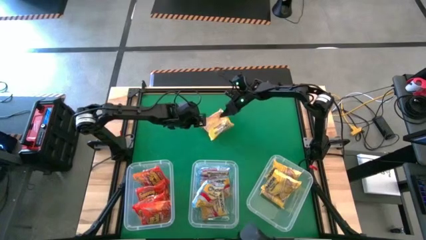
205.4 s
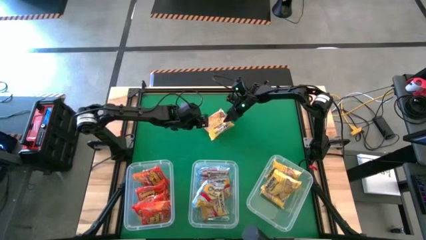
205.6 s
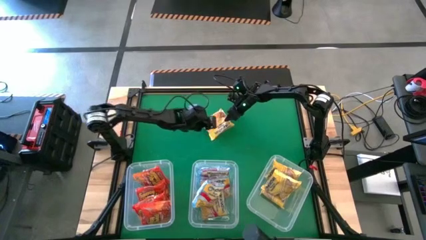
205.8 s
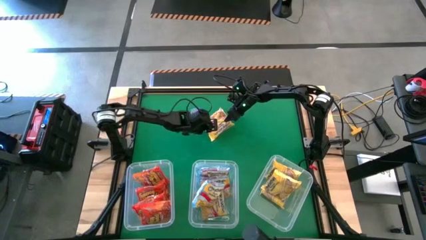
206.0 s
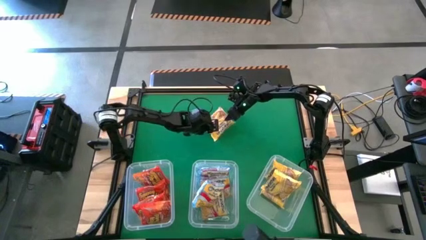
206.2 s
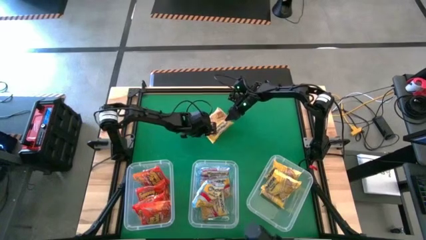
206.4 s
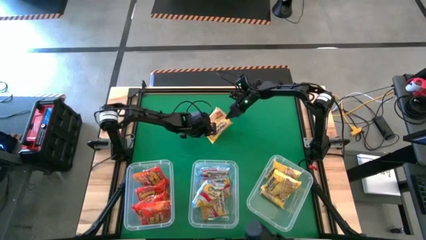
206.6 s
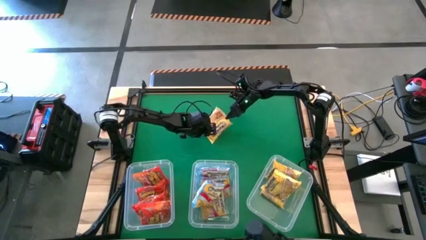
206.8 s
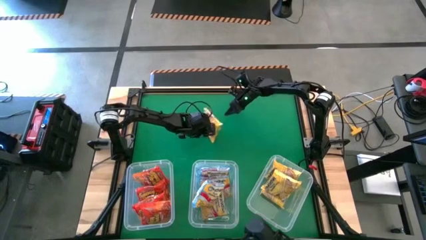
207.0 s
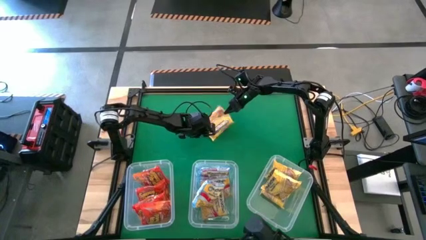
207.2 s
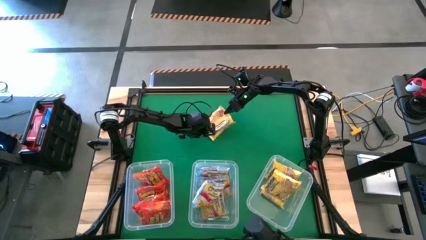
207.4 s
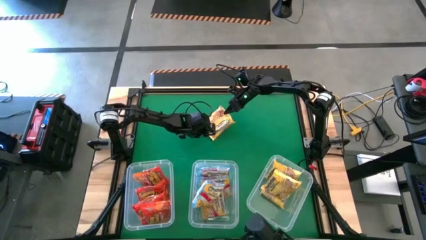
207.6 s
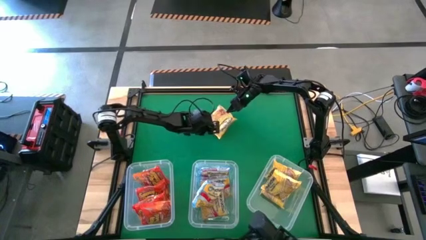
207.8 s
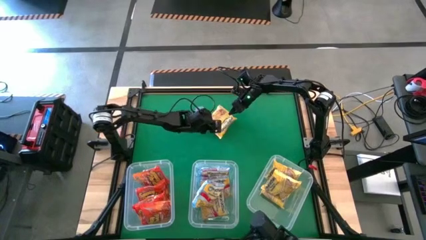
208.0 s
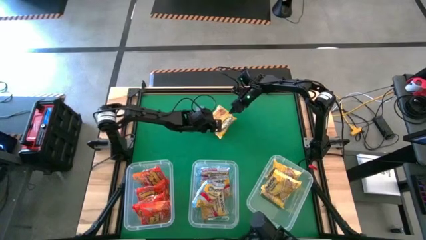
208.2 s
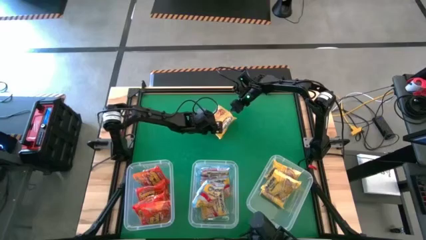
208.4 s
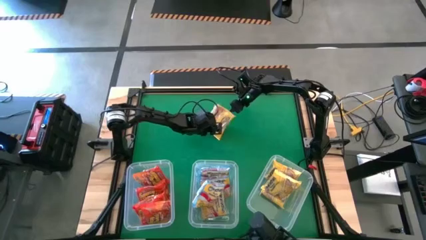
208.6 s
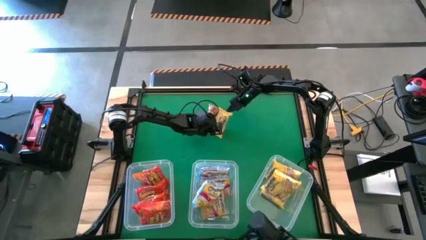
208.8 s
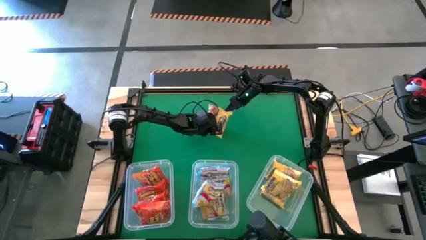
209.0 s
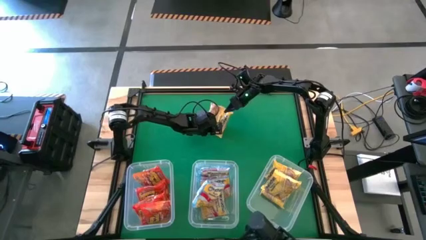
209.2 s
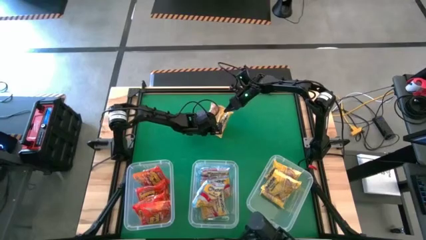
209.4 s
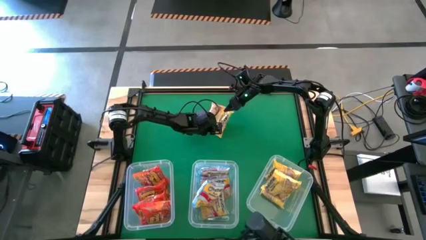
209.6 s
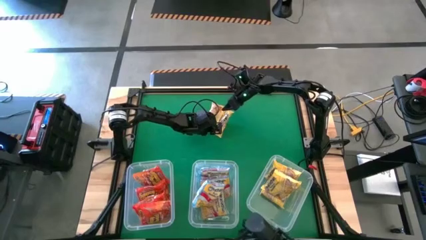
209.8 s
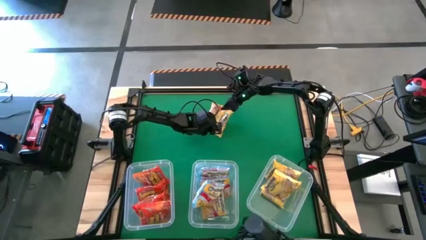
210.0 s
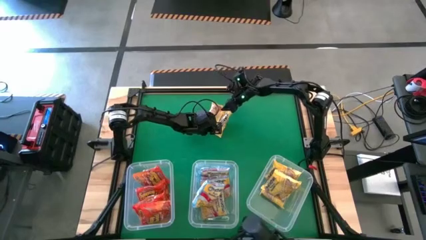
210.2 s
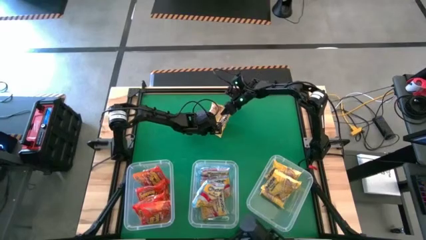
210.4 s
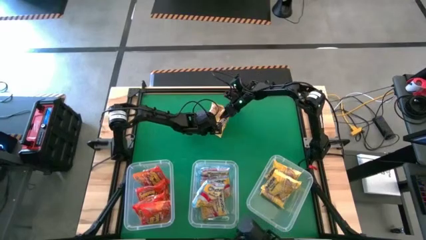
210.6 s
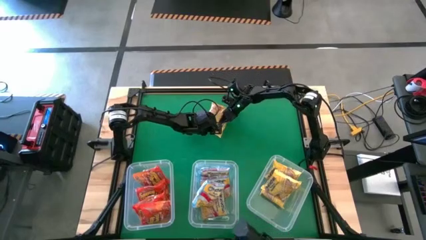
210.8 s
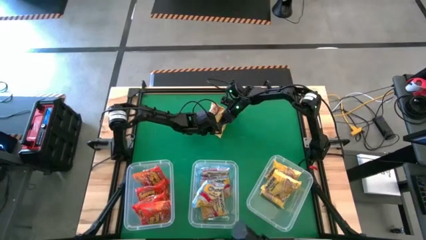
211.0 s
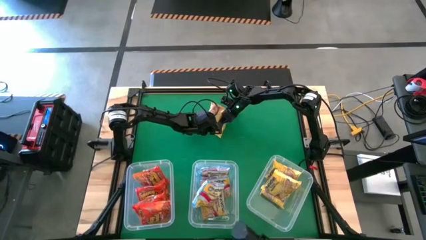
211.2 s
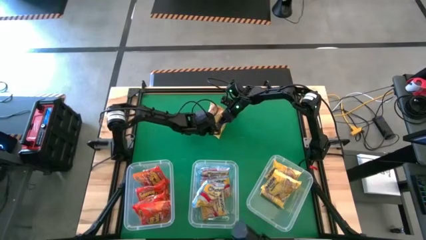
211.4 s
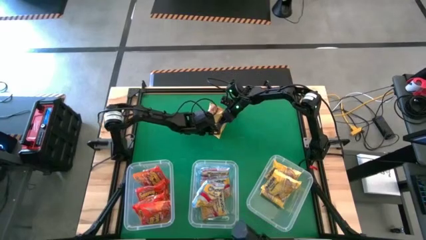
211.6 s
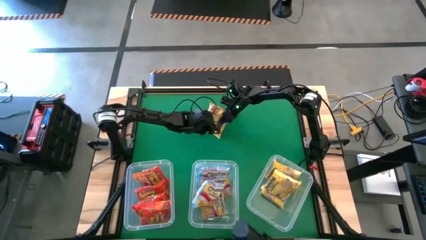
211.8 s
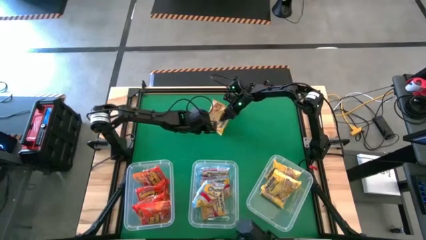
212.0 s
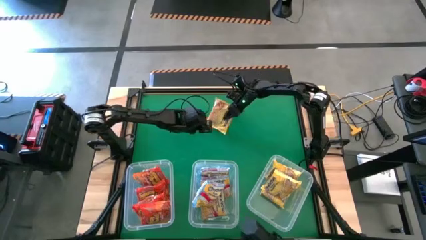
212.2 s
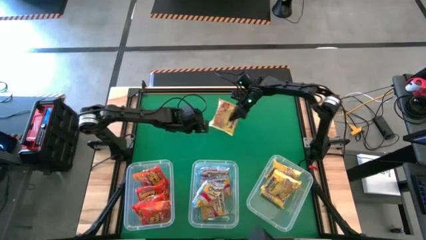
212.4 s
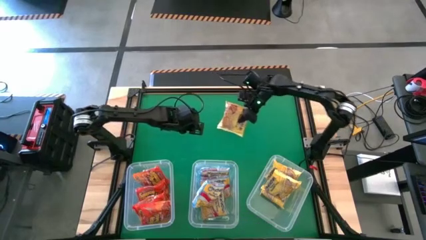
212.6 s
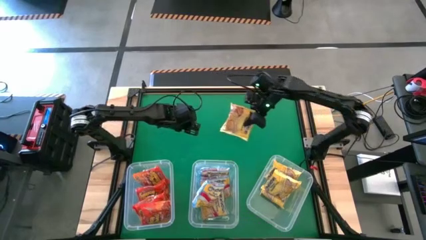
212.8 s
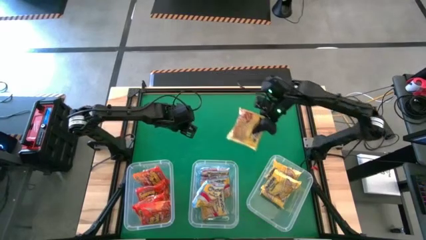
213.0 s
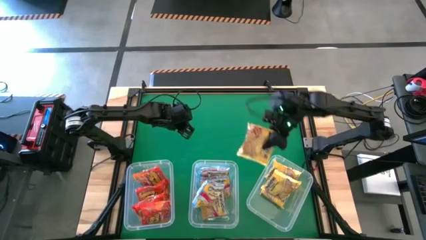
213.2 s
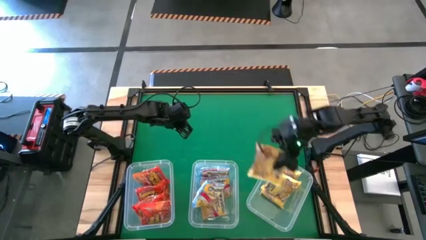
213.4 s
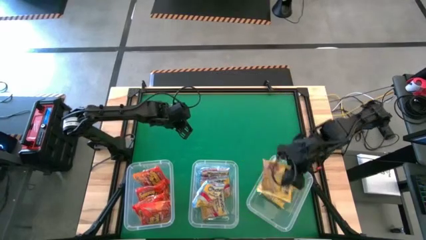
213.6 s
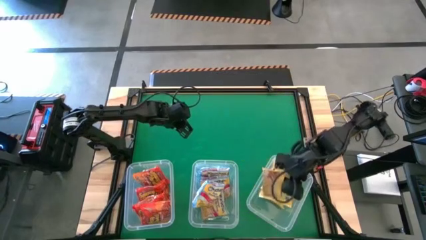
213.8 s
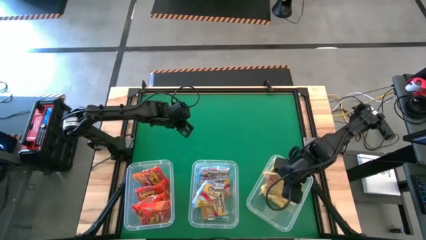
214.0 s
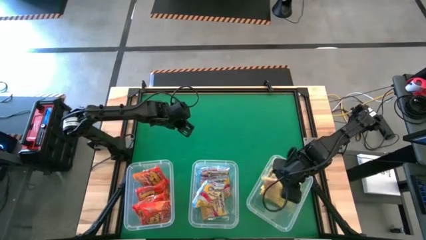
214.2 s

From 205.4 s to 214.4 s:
Task: Sort Maruchan noodles
Put the yellow noodle pack into the right transparent bin

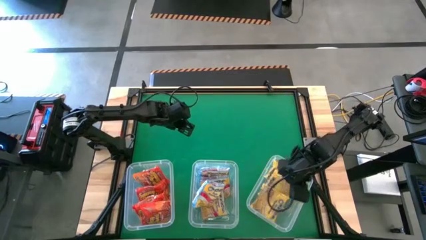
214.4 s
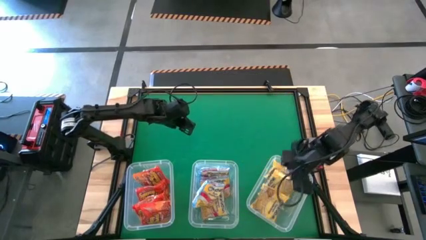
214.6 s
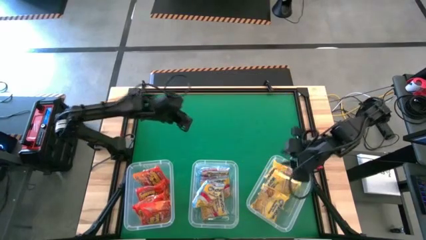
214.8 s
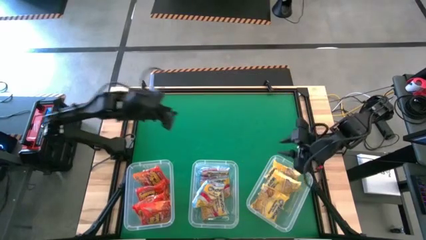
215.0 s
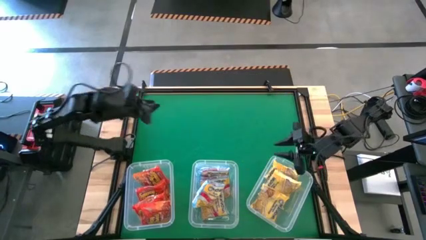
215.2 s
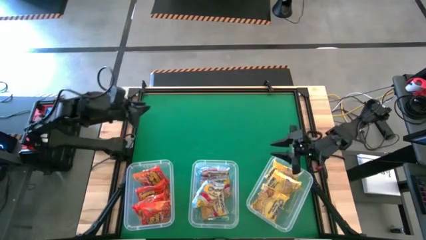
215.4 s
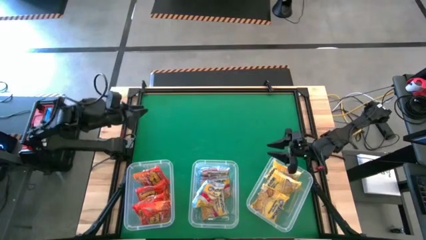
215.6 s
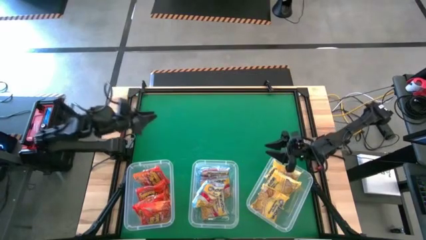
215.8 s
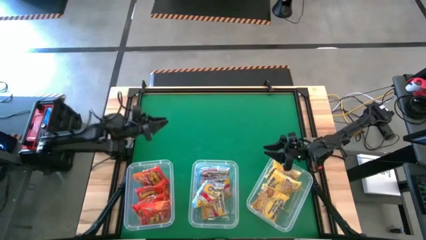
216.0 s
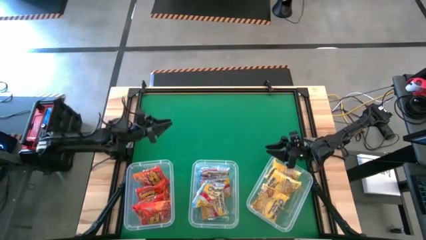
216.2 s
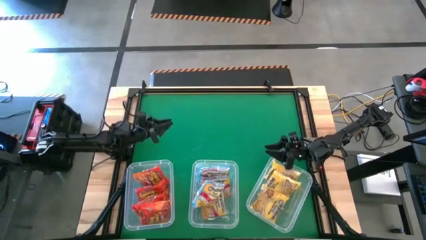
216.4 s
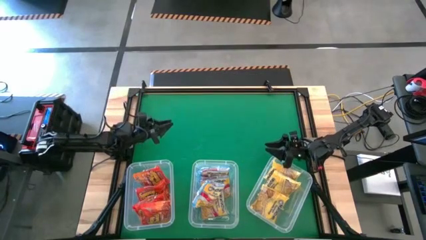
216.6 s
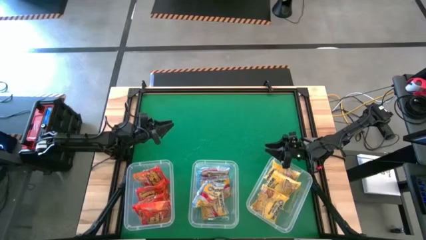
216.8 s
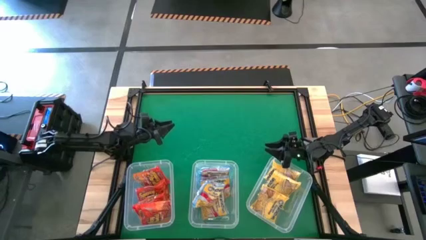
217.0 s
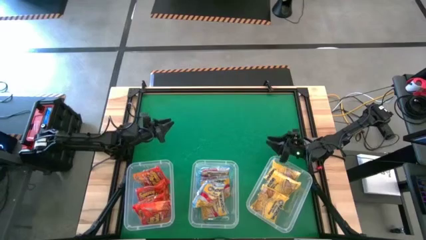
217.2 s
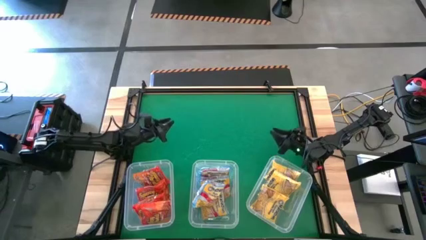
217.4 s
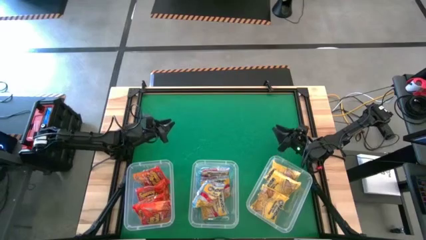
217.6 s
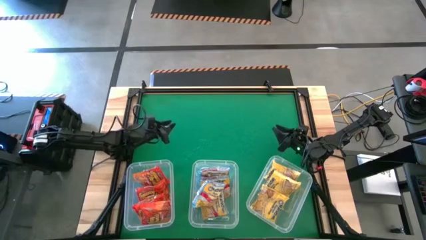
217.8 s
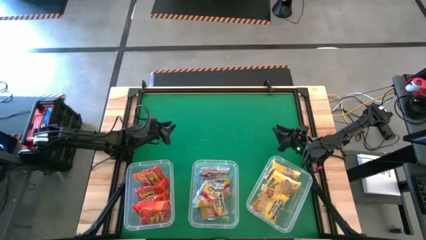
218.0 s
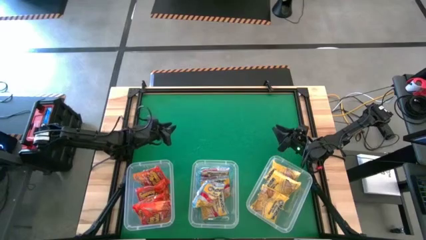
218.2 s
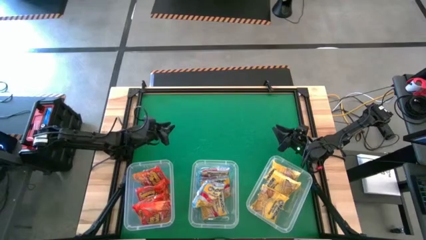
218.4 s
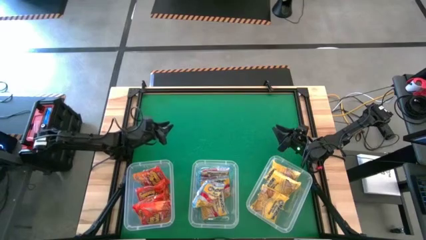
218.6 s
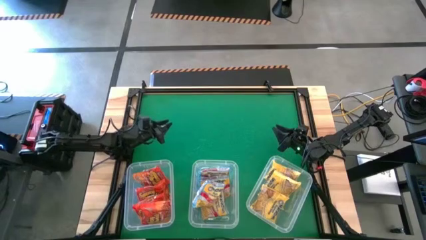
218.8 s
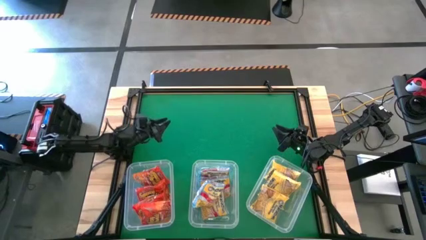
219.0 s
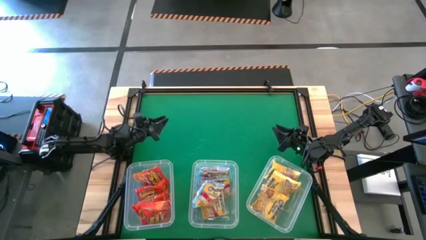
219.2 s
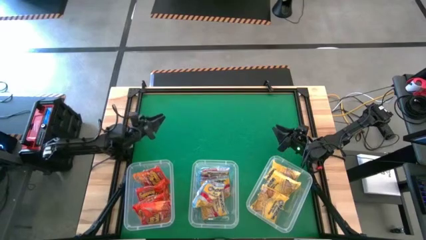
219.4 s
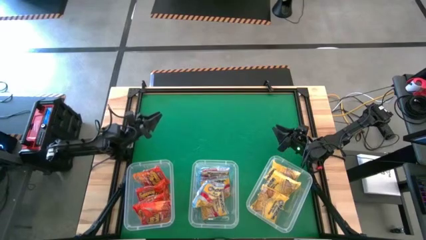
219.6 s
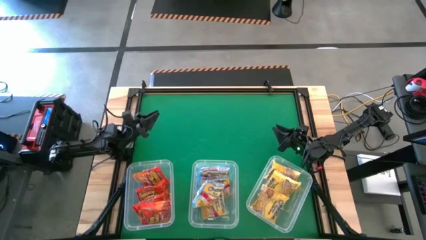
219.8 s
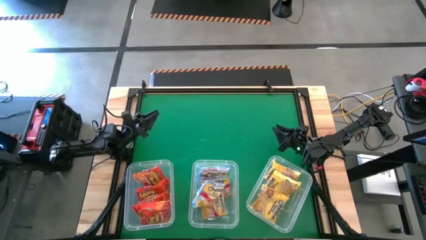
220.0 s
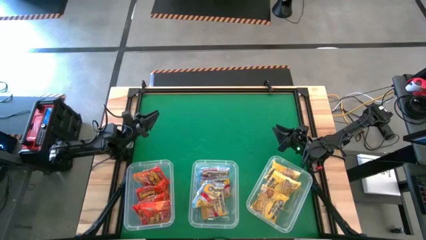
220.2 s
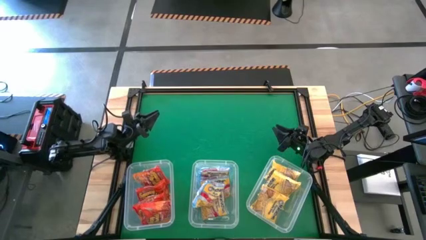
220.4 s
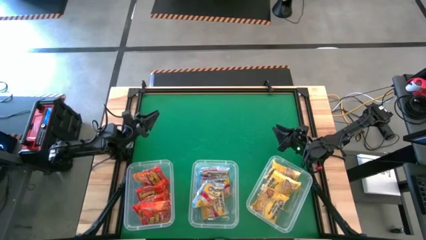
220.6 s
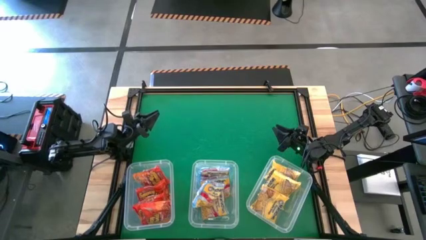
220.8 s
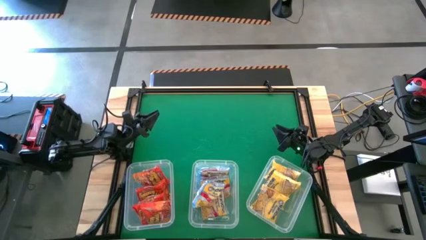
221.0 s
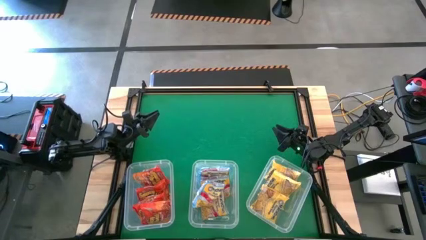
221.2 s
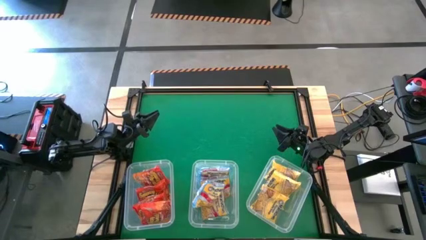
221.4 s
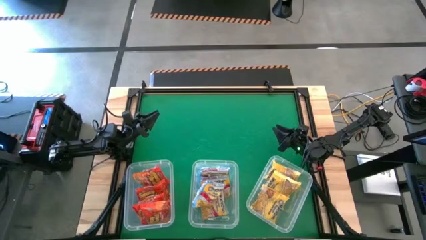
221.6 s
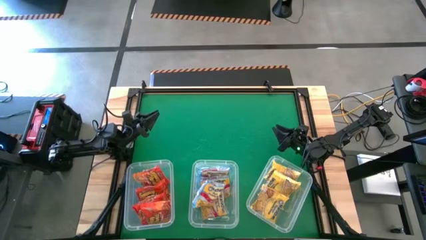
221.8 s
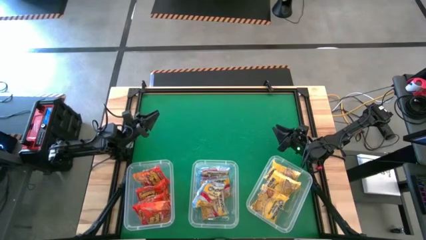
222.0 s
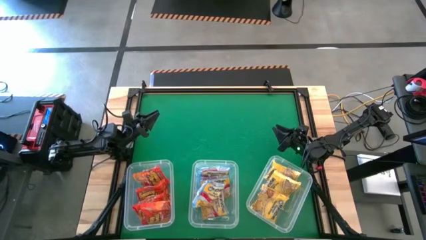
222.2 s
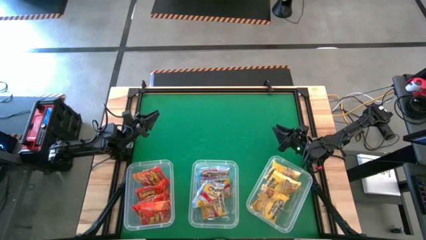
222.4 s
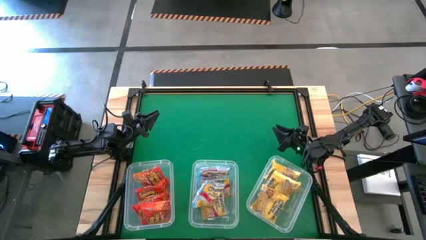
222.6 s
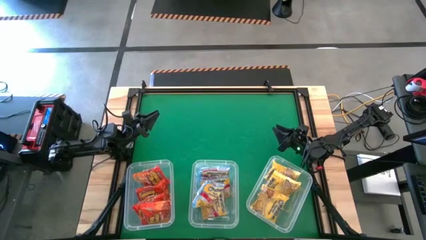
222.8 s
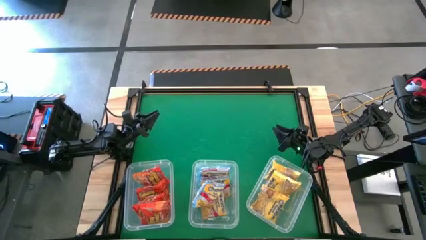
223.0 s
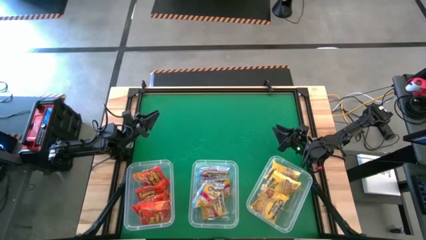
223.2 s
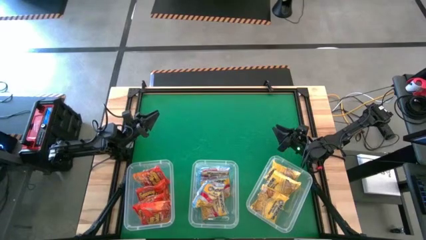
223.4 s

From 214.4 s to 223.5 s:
Return to Home Position
